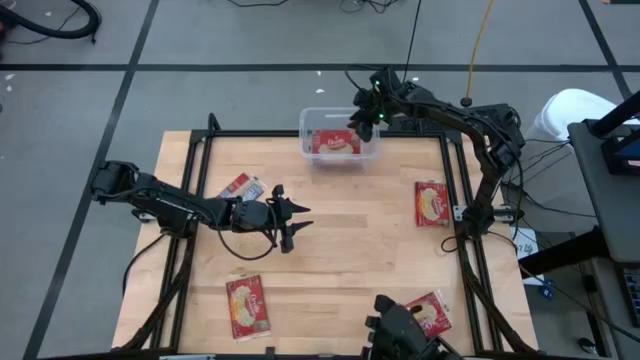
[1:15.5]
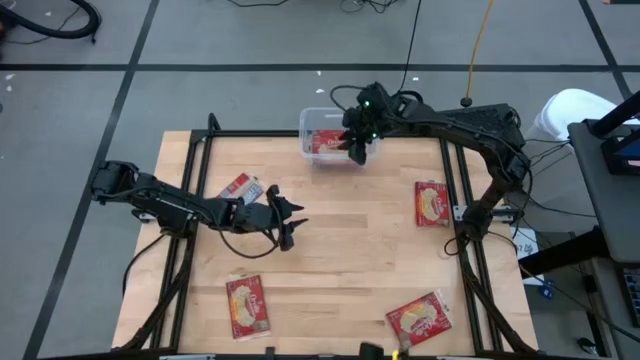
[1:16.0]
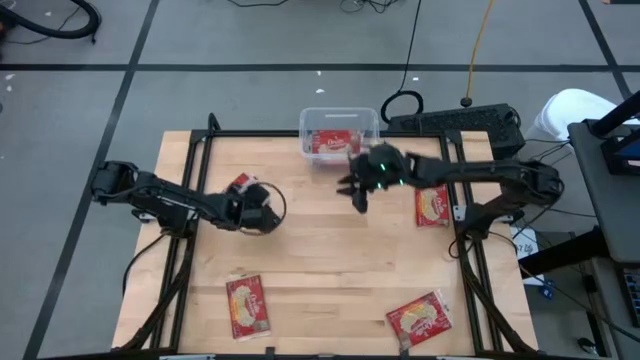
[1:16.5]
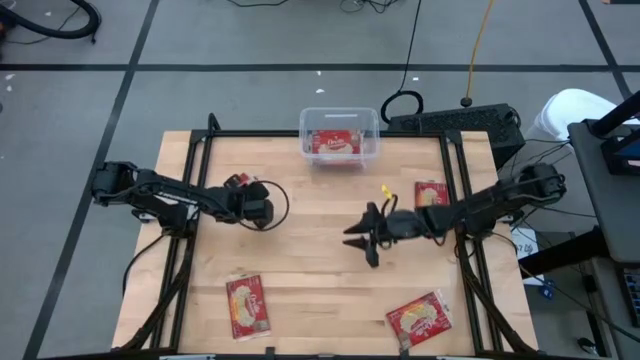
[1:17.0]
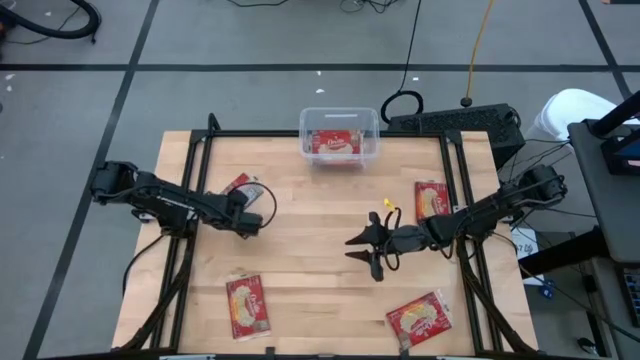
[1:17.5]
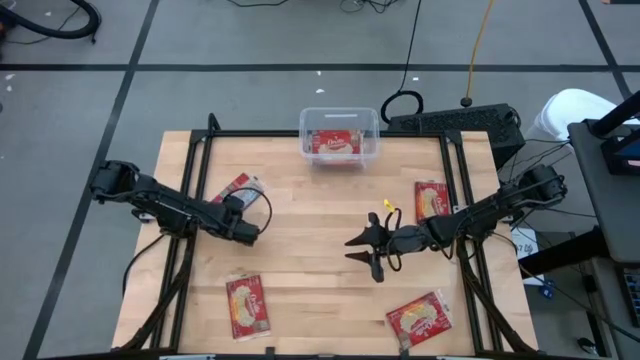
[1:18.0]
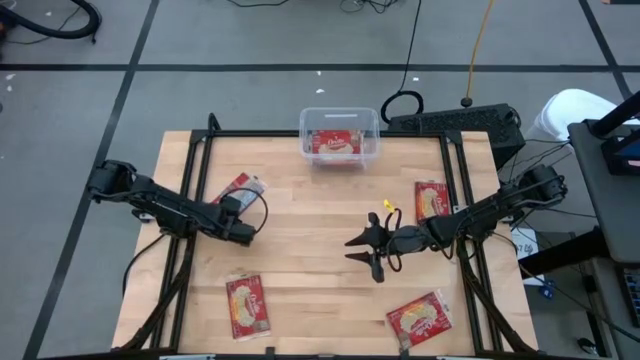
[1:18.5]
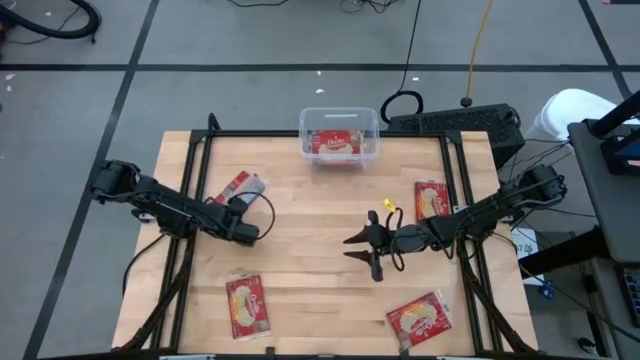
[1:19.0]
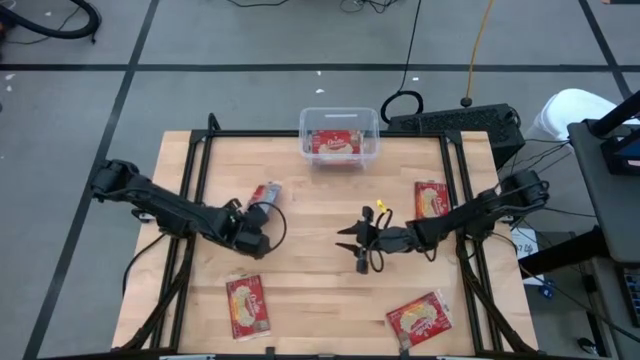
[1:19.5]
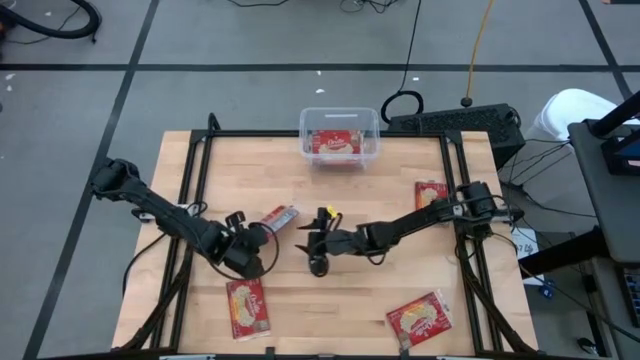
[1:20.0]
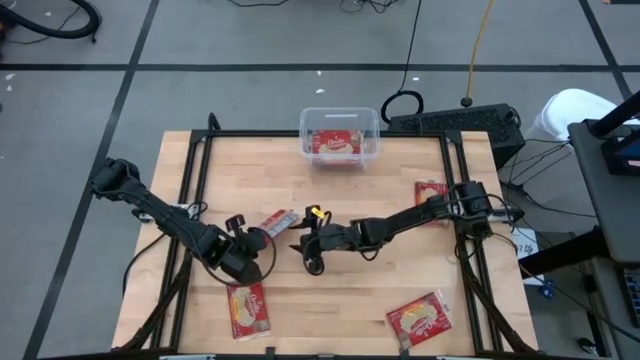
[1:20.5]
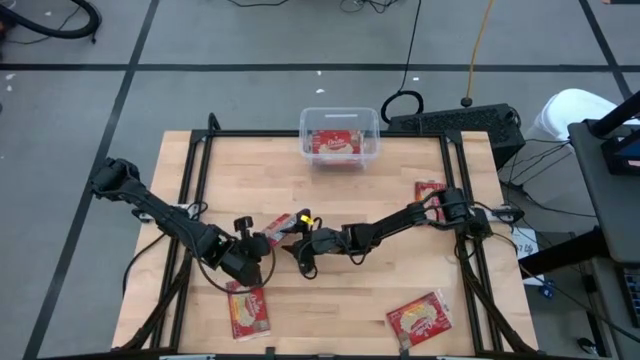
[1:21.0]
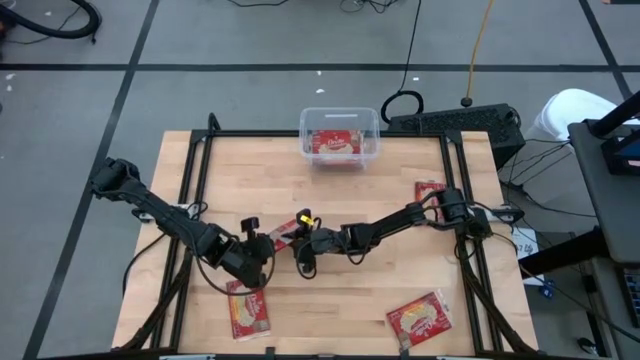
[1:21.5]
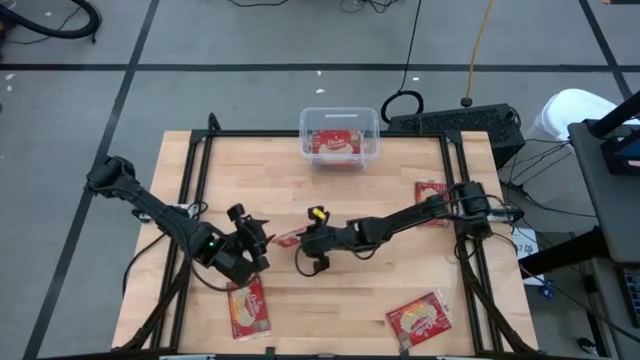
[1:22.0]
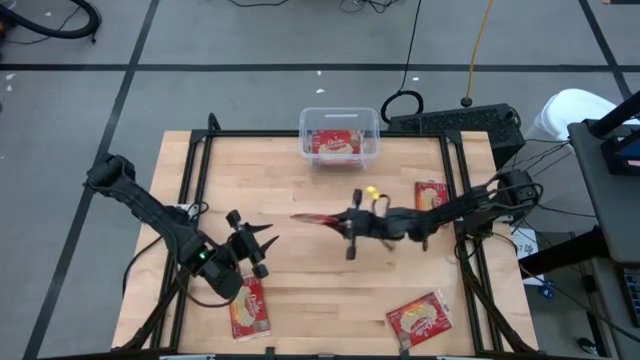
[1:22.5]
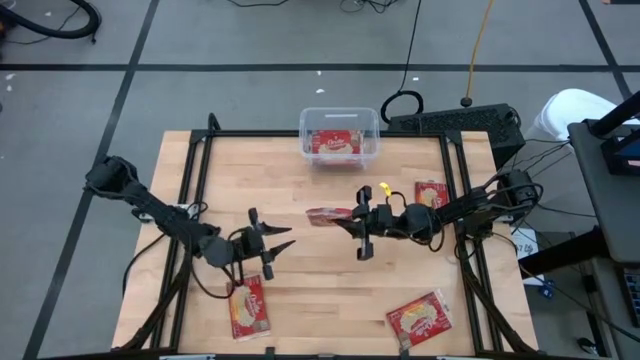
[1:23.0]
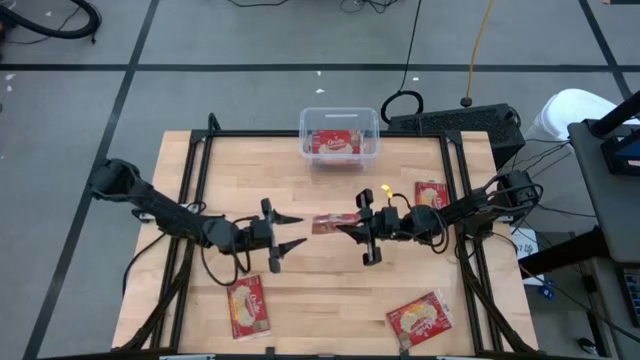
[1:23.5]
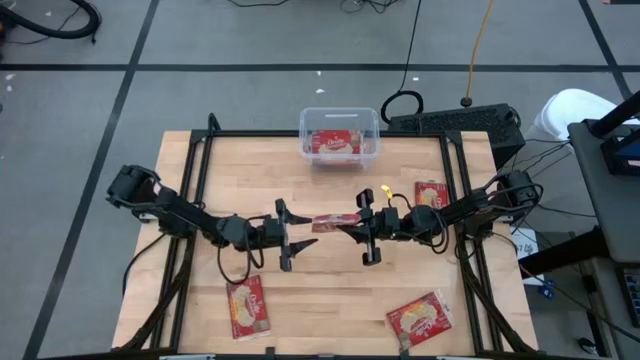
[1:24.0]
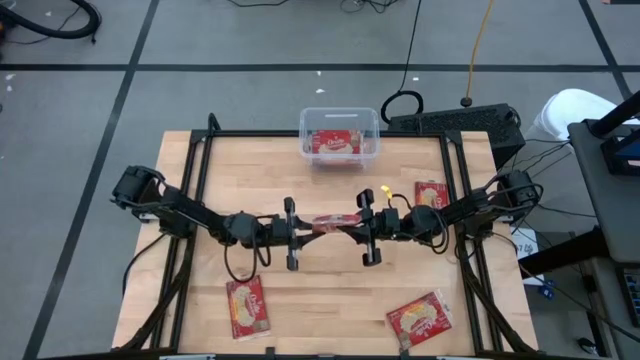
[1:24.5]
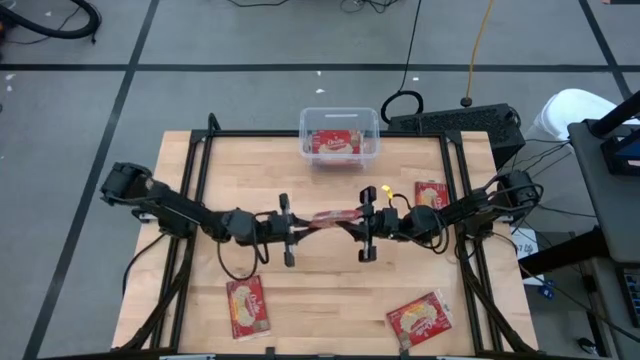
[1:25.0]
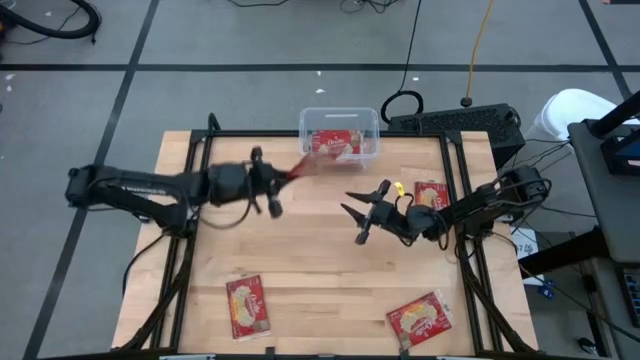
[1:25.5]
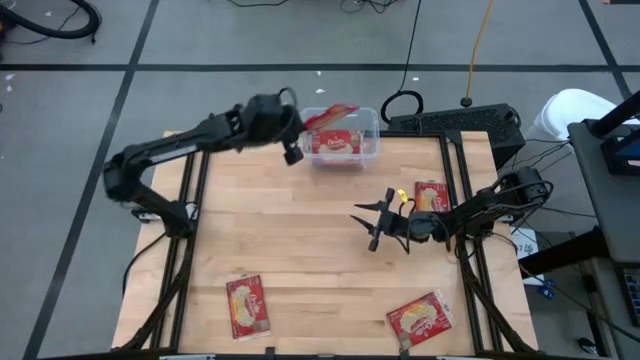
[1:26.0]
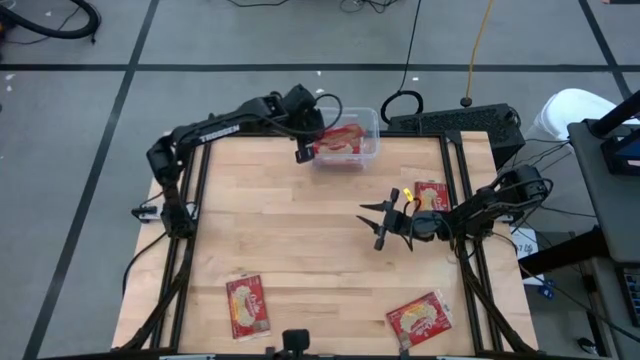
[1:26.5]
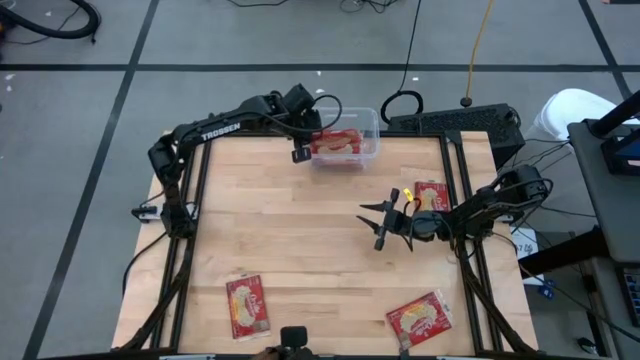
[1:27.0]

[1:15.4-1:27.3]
Task: Sort popcorn bags into baskets
Put the popcorn bags into the transparent bin

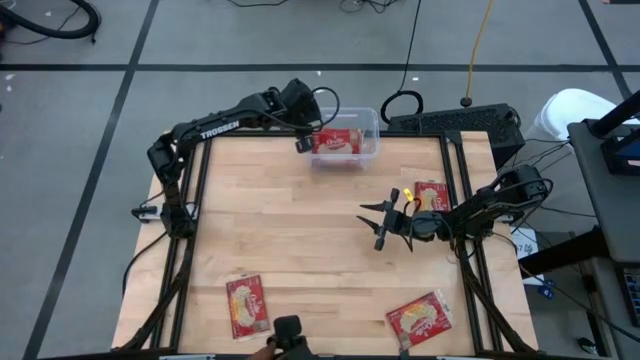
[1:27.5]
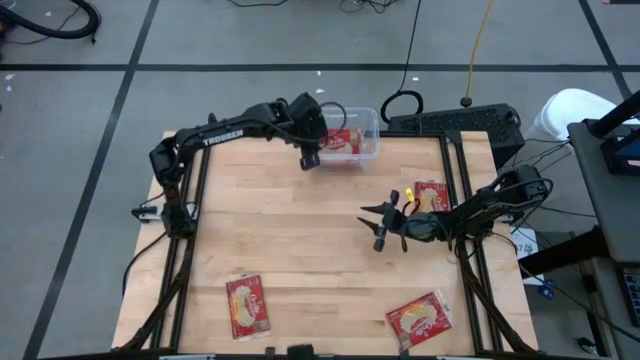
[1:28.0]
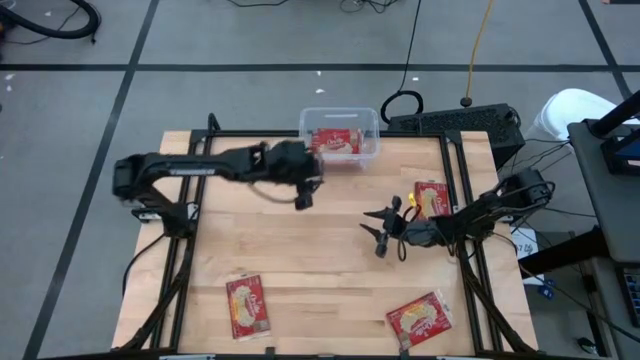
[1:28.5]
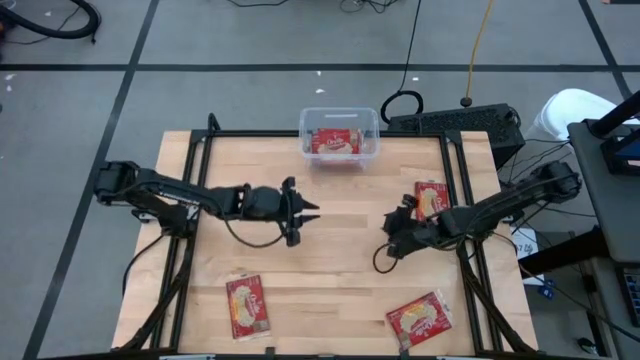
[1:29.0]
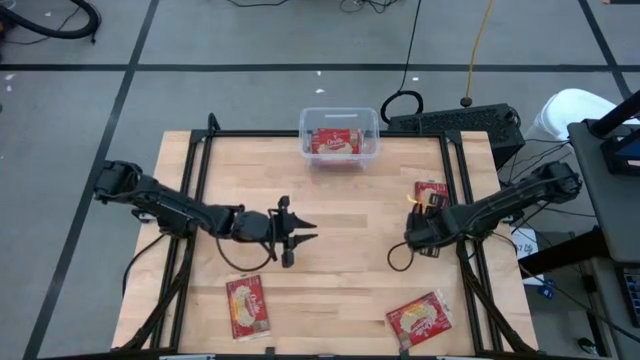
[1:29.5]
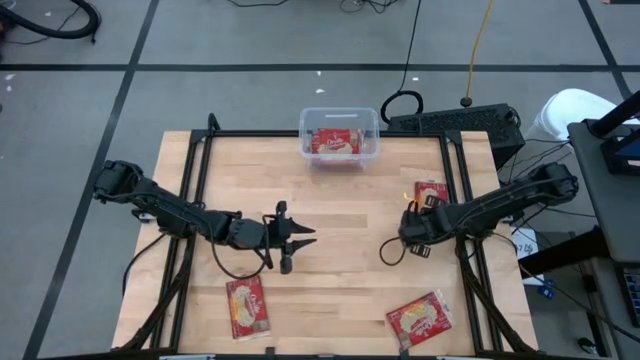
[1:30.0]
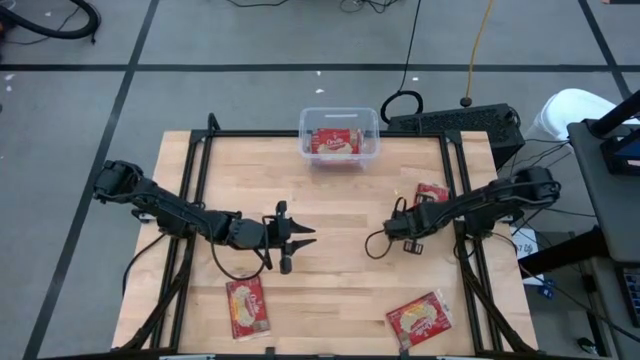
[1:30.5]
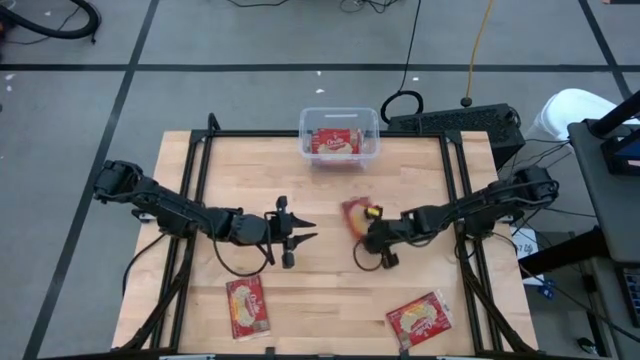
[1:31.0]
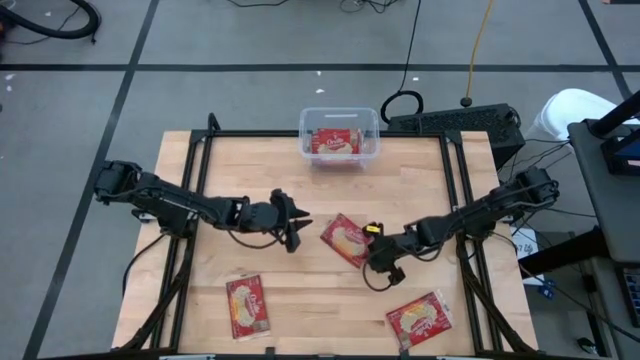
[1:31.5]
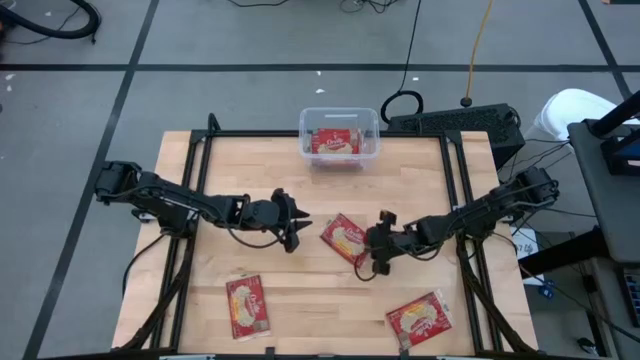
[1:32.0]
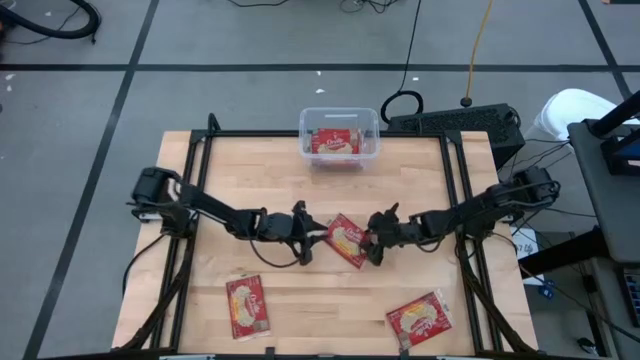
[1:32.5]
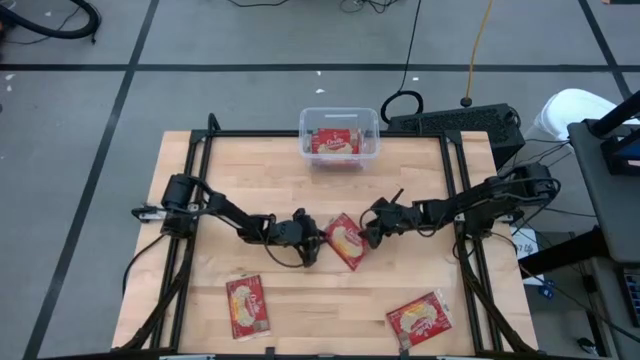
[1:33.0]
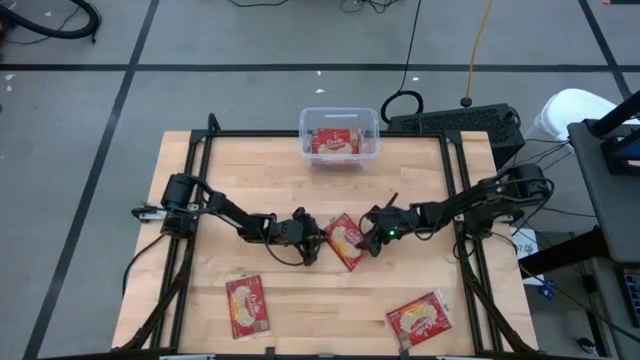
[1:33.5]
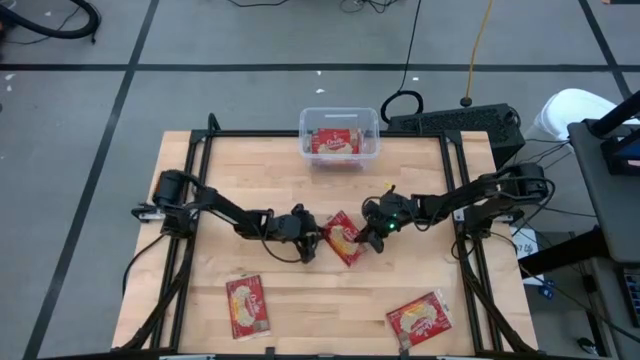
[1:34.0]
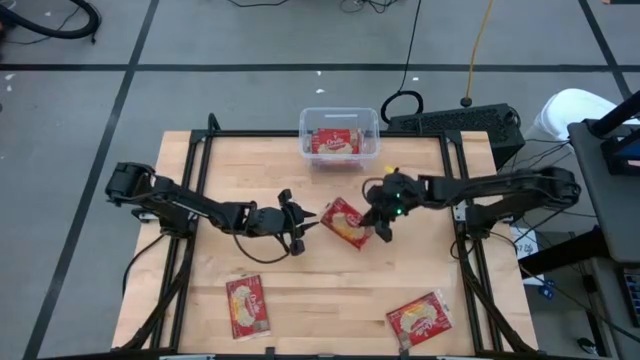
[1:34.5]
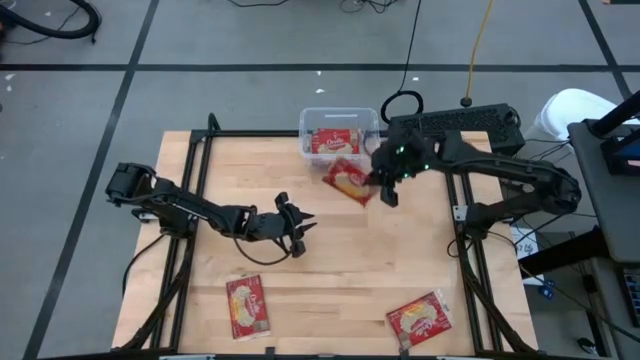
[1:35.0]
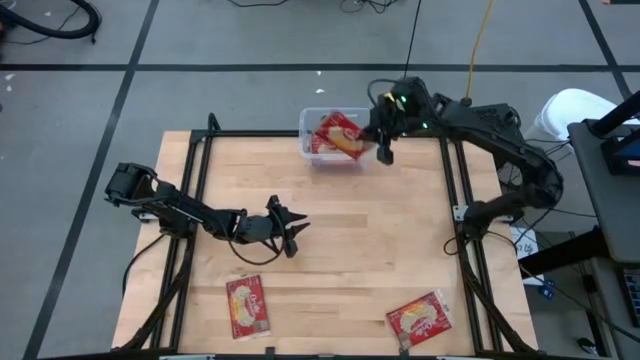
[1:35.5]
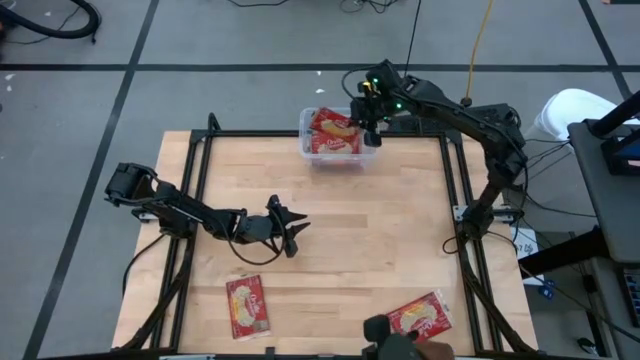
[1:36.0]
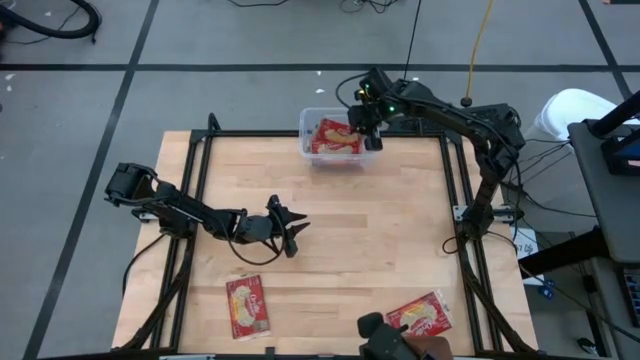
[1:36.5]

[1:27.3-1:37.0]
Put the popcorn bags into the transparent bin
